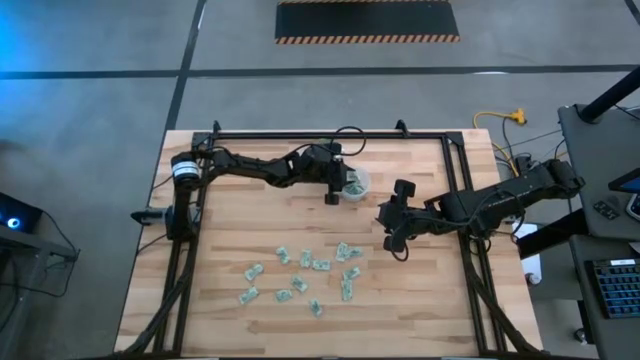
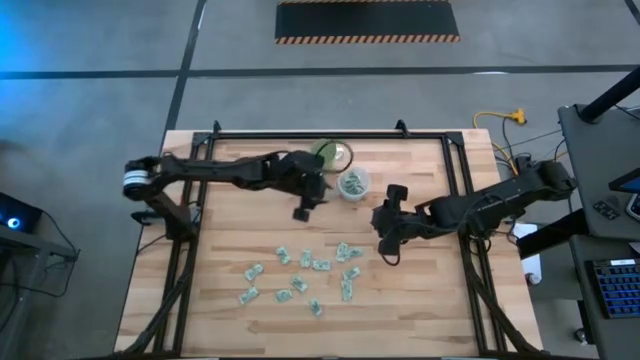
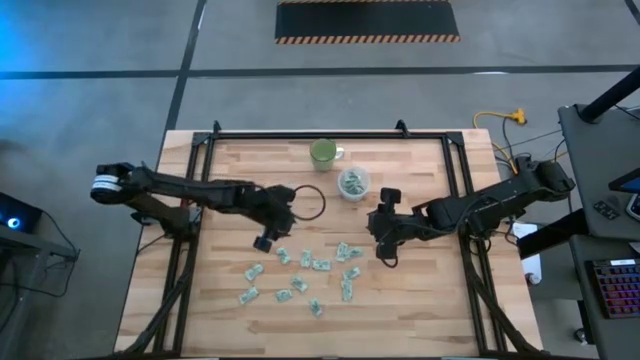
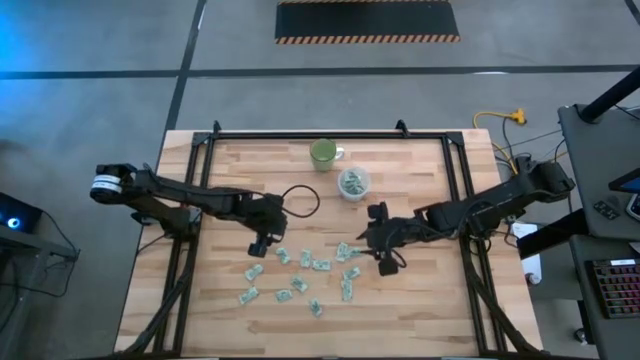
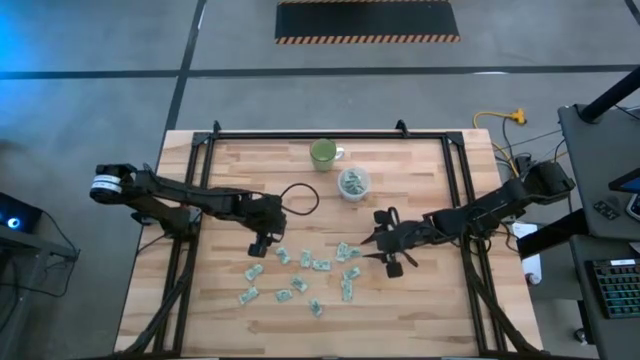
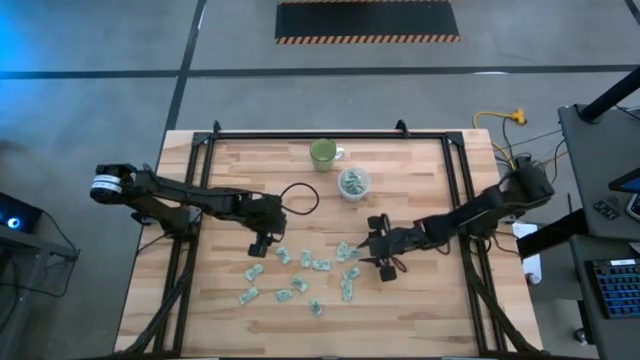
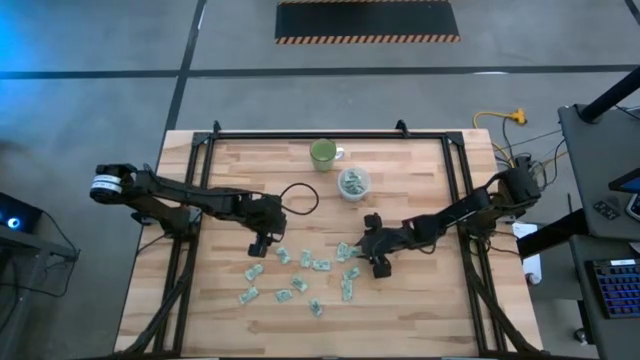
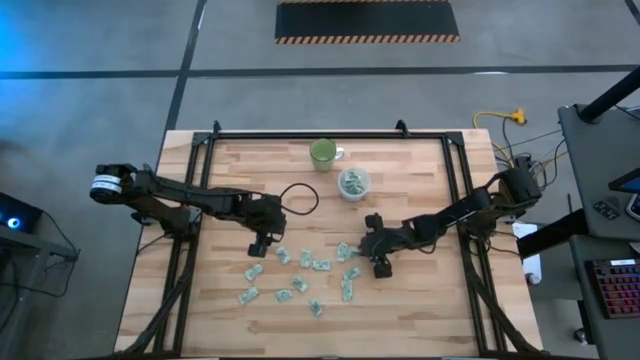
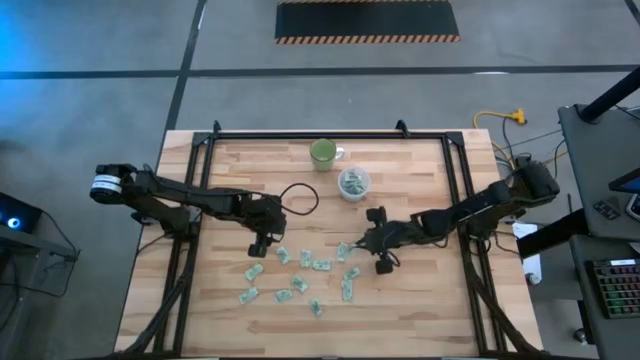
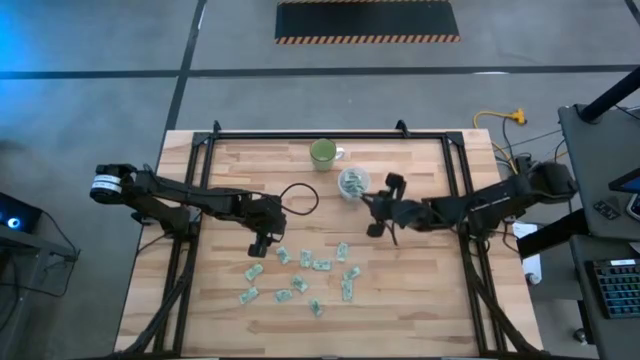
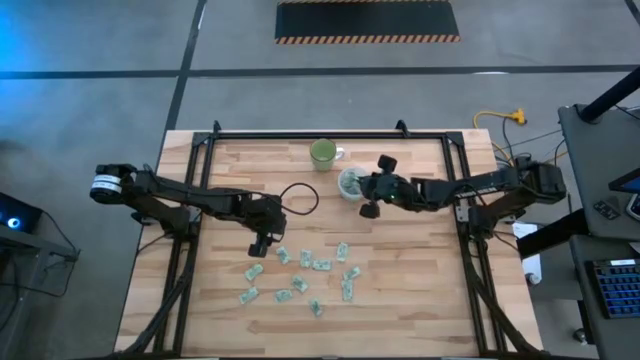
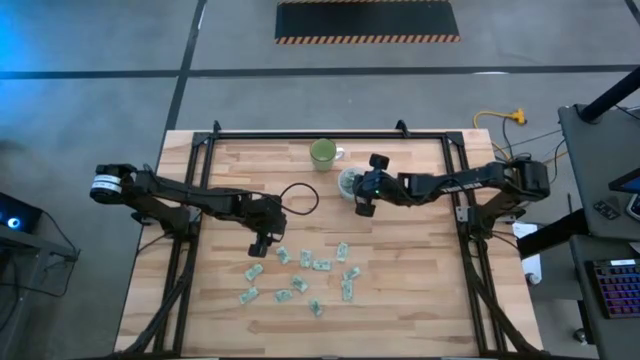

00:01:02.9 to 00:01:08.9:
Task: Pick and place Stevia / Truvia into bins
Put the stevia packet into the transparent container

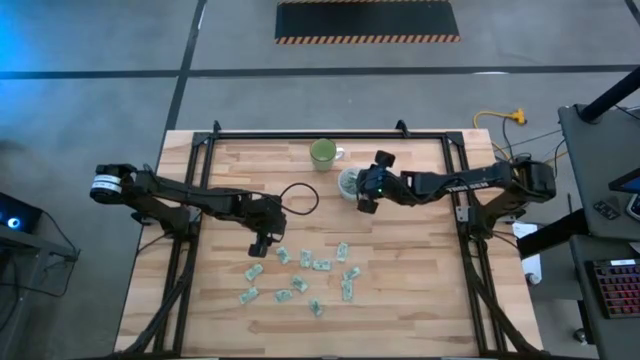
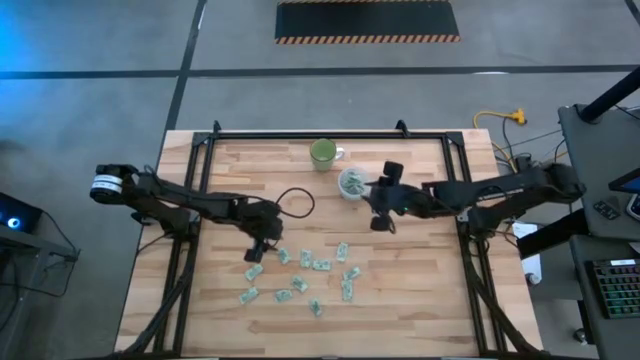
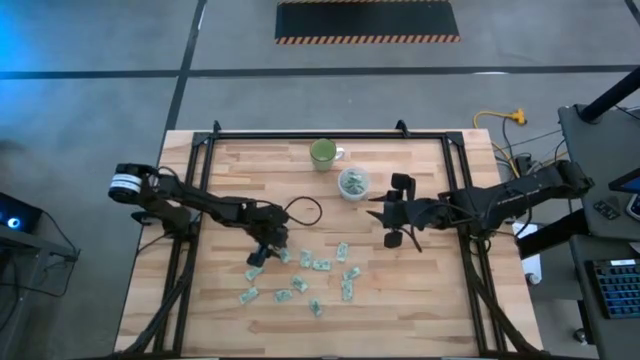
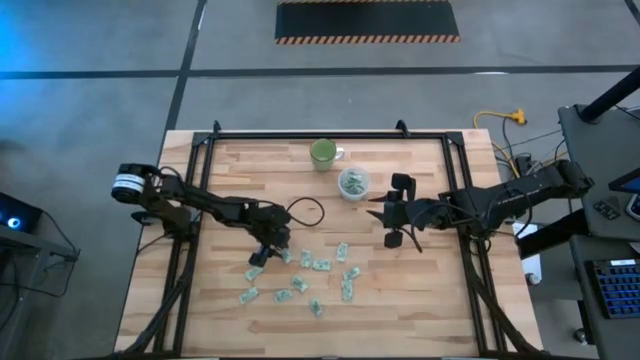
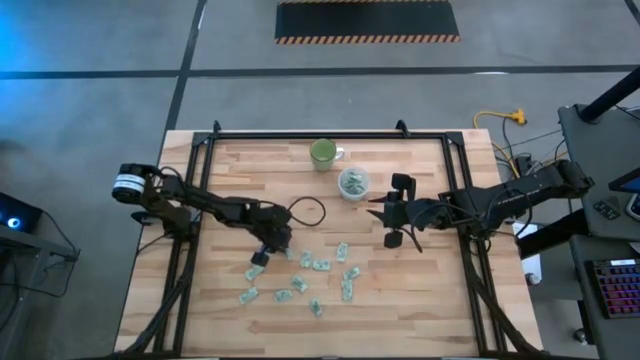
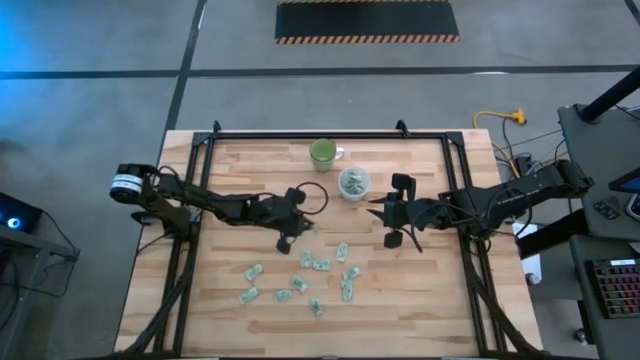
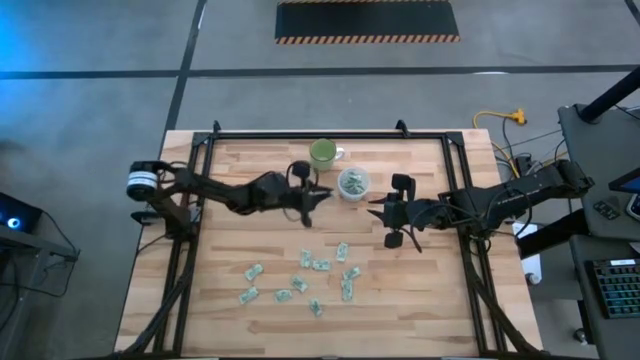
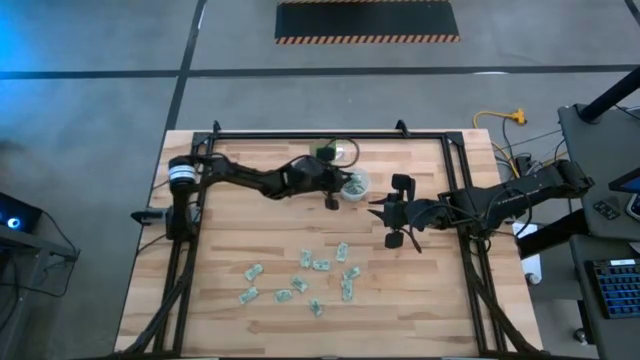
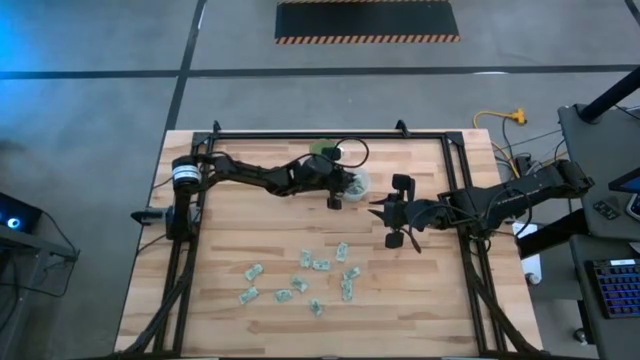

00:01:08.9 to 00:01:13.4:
Put the stevia packet into the transparent container

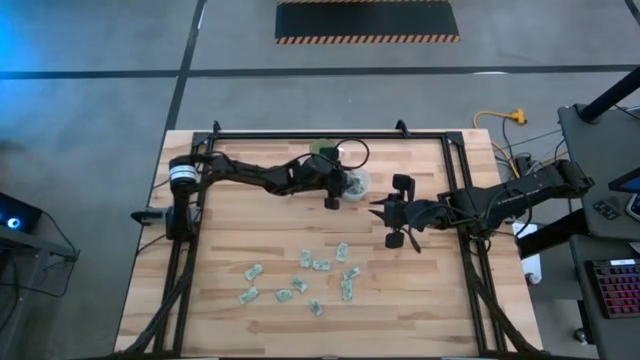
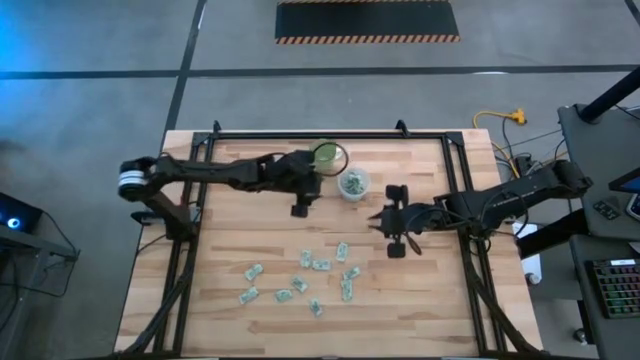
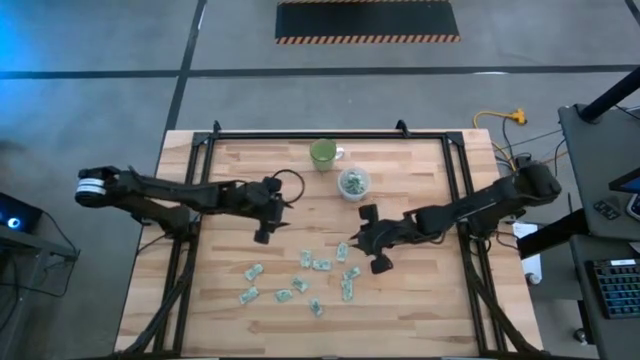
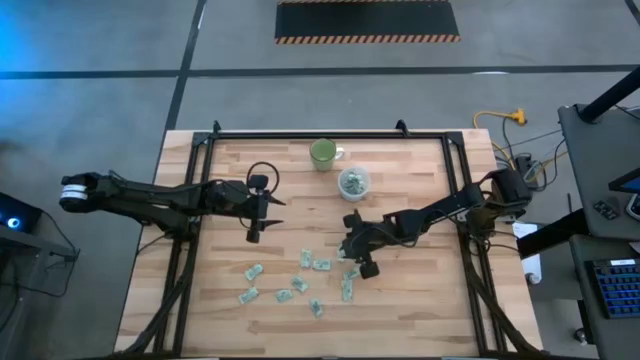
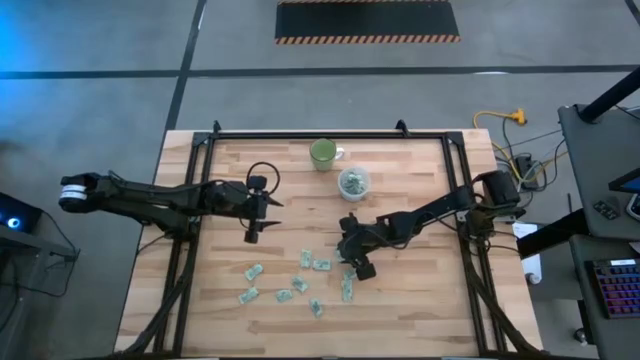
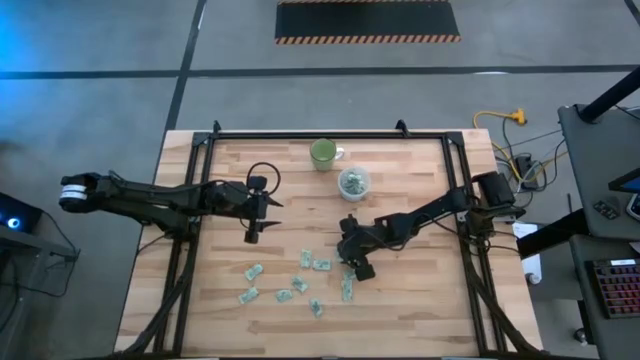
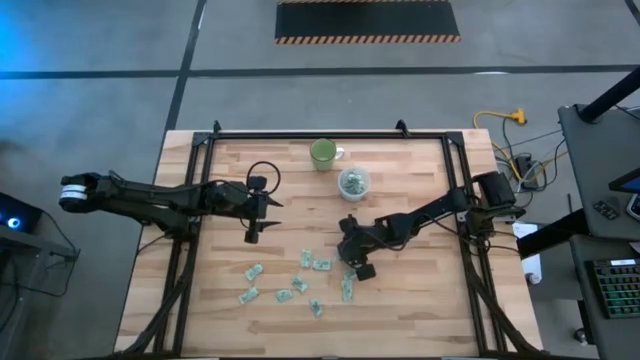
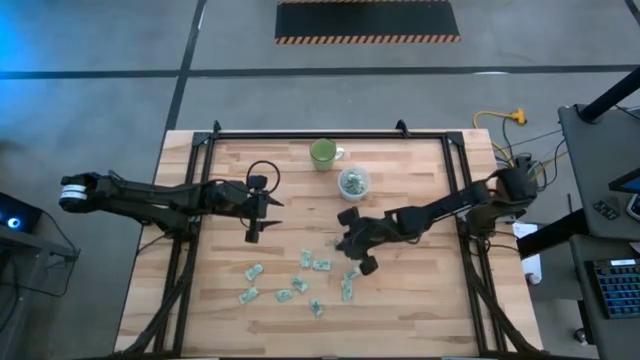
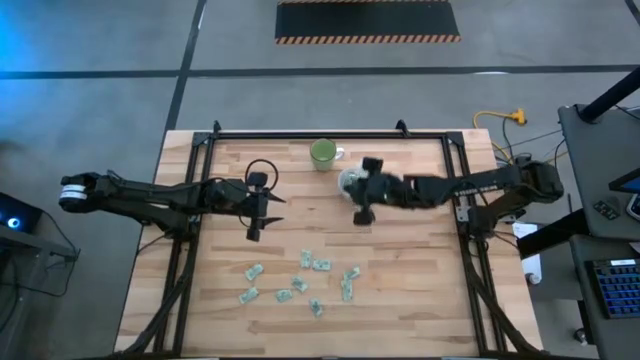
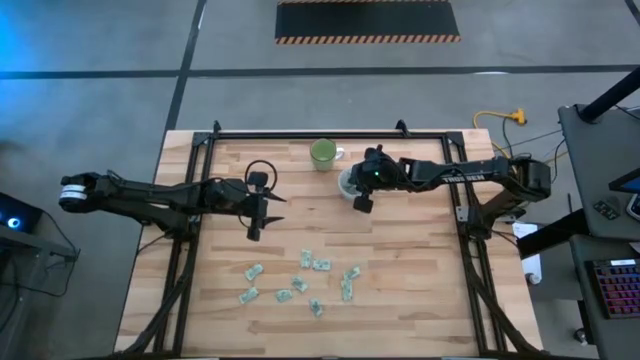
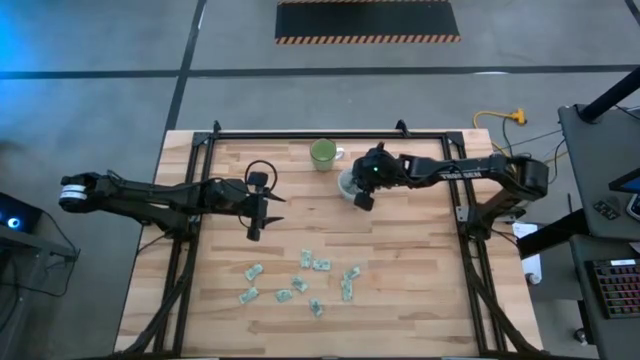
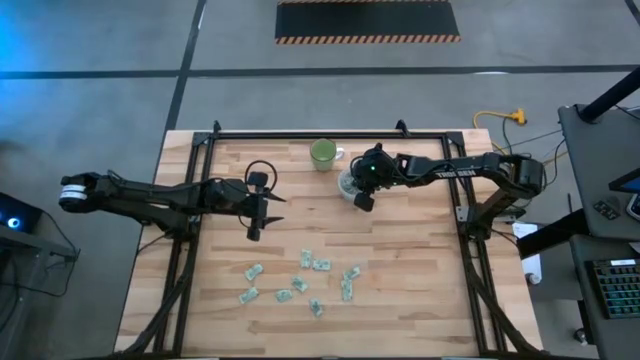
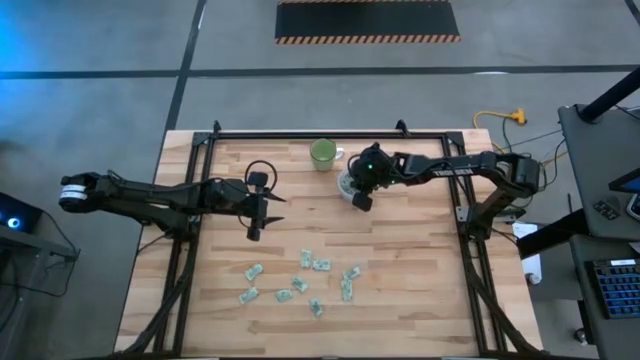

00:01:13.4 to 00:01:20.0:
Put the stevia packet into the transparent container

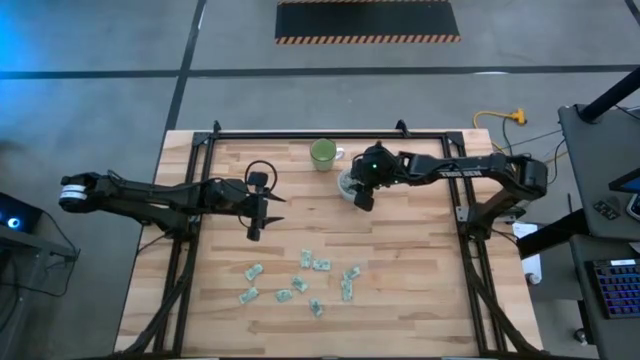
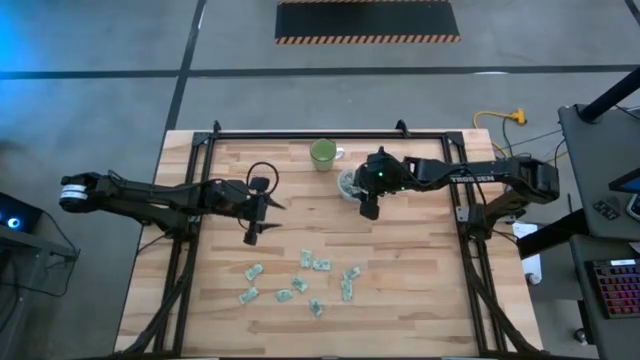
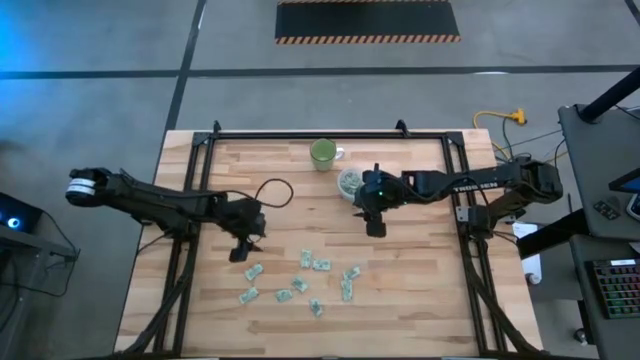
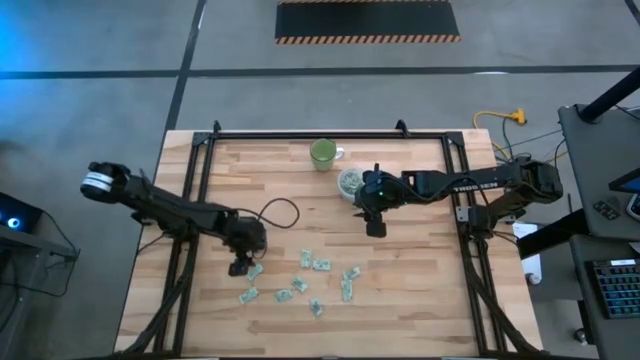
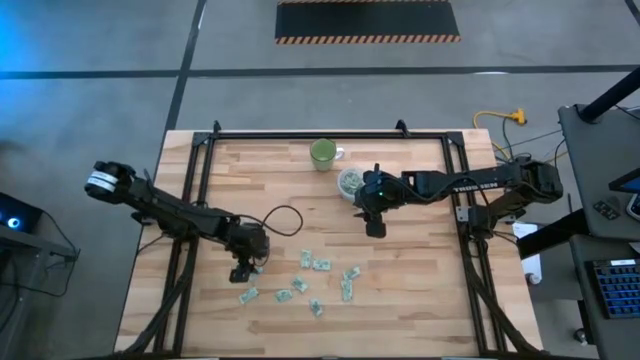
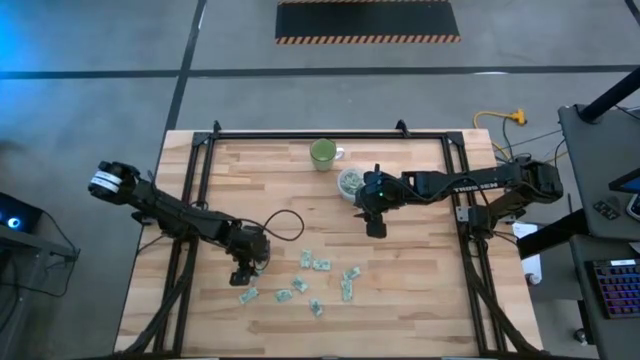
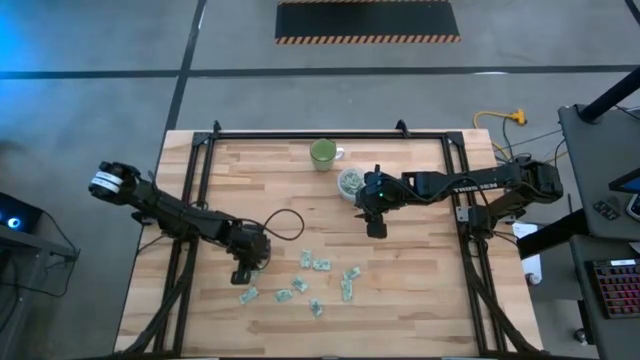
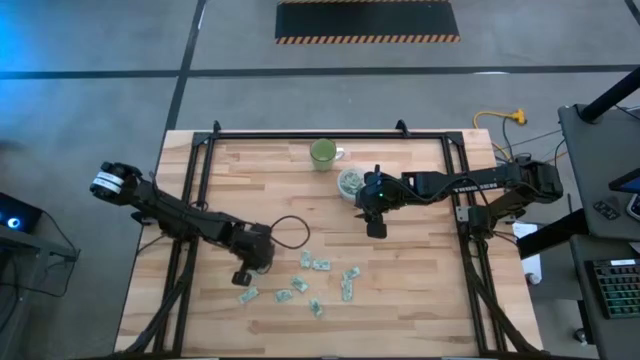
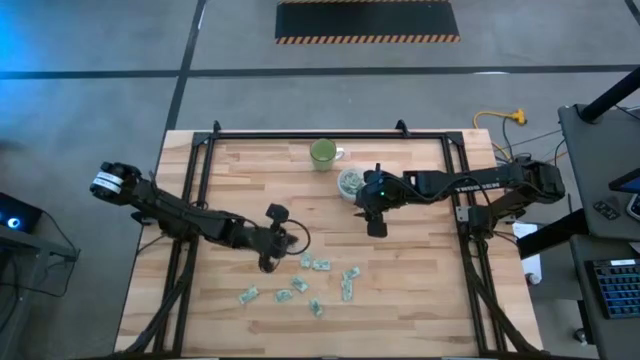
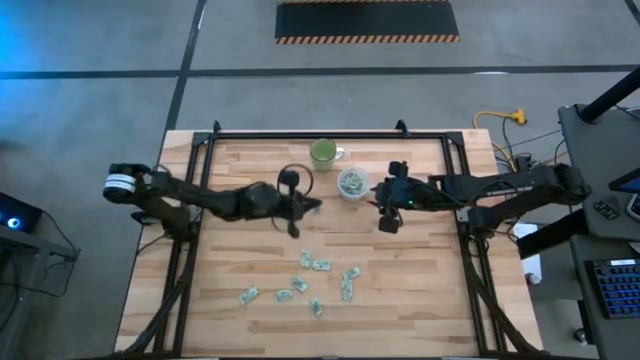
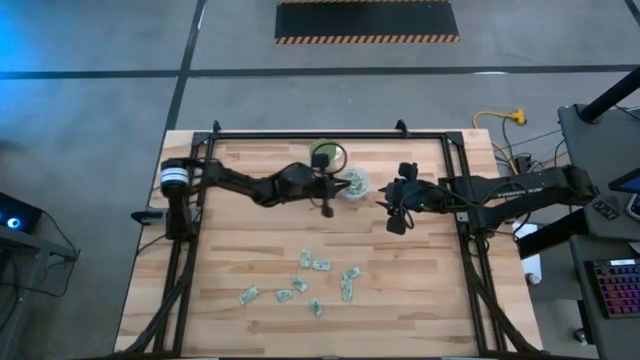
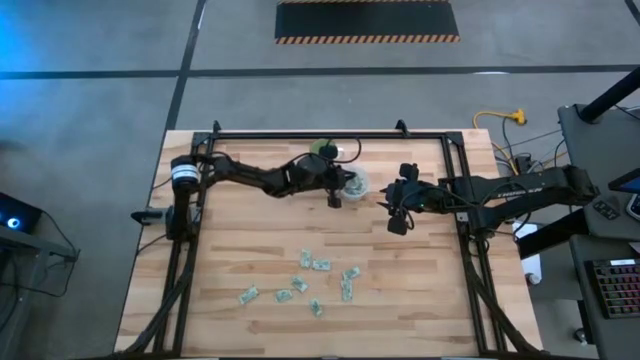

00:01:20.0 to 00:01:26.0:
Put the stevia packet into the transparent container
